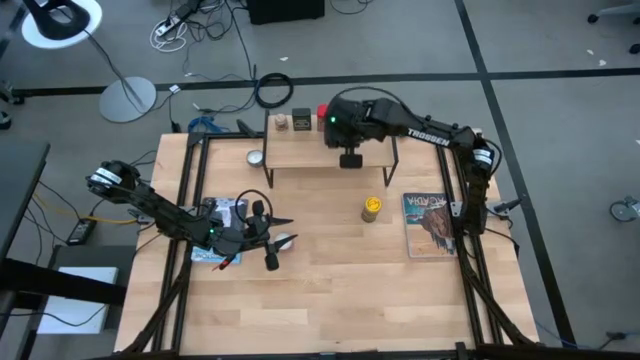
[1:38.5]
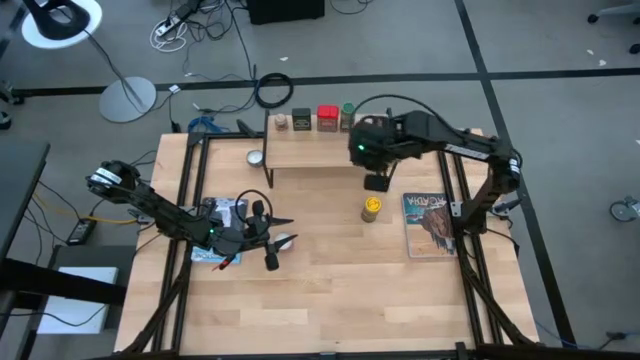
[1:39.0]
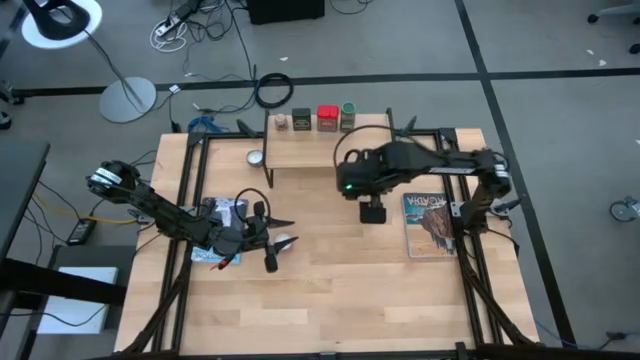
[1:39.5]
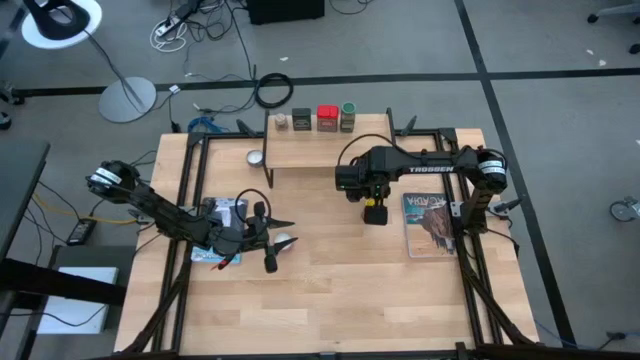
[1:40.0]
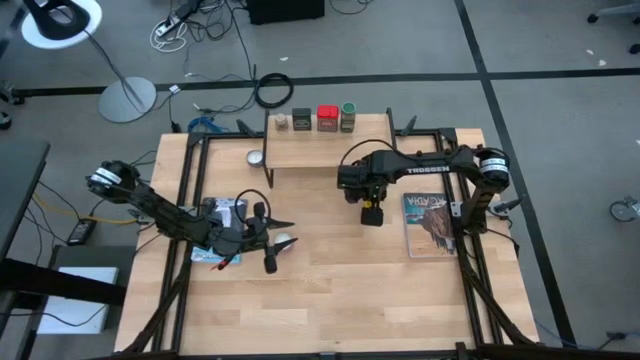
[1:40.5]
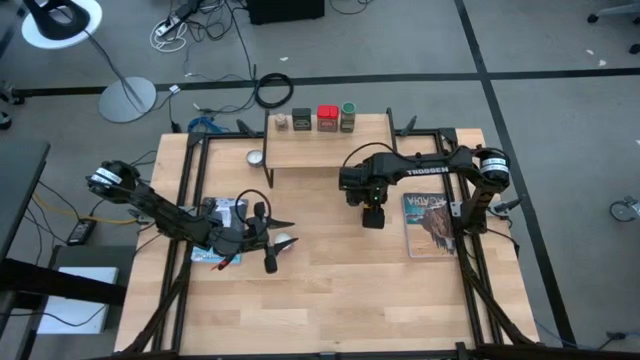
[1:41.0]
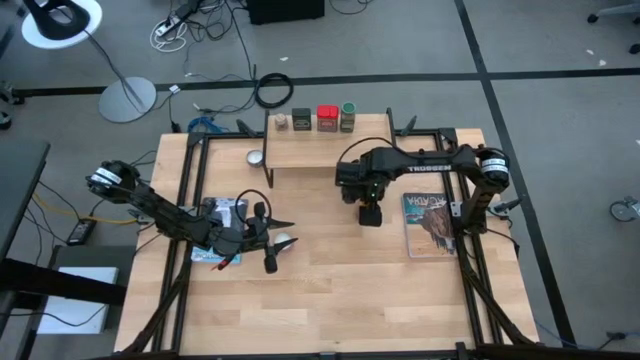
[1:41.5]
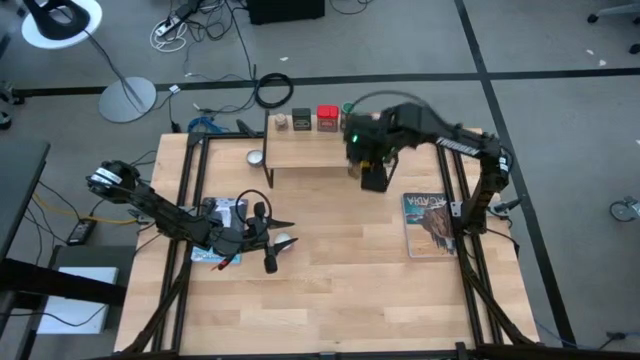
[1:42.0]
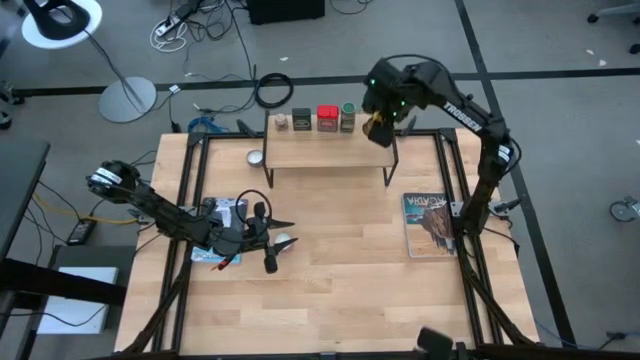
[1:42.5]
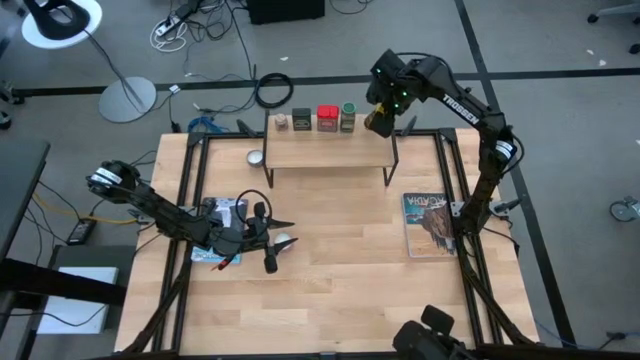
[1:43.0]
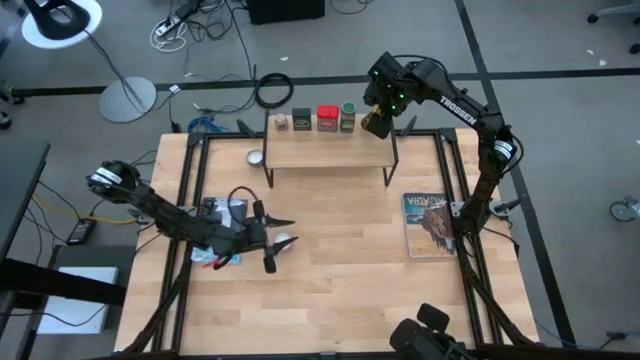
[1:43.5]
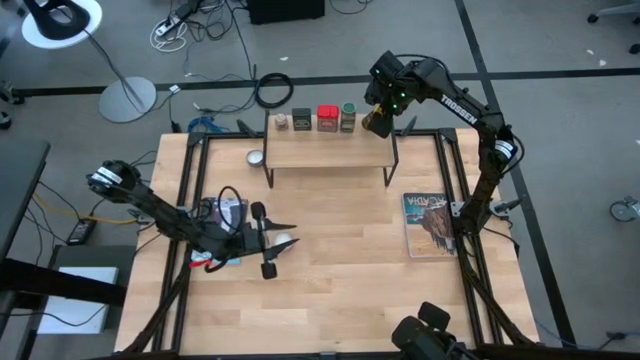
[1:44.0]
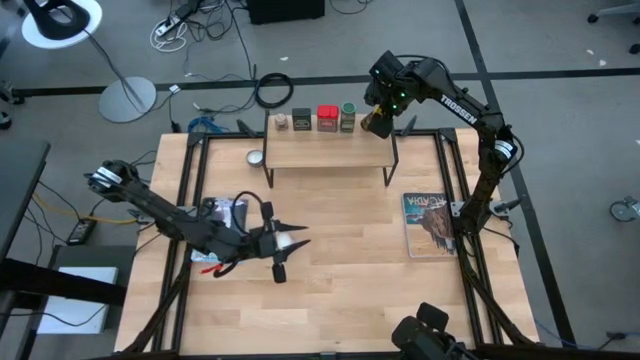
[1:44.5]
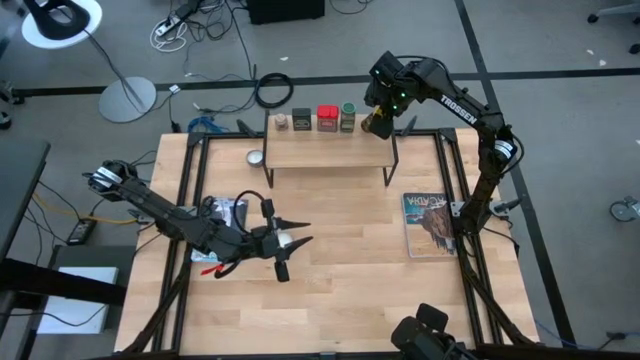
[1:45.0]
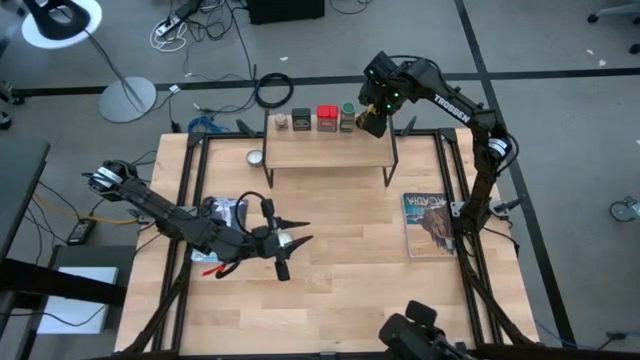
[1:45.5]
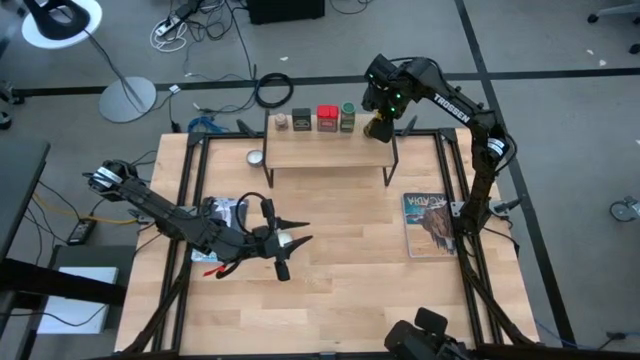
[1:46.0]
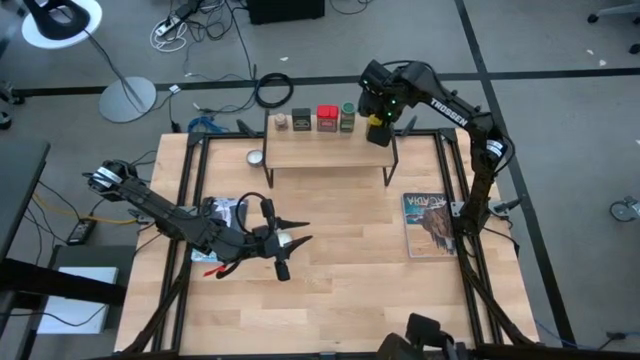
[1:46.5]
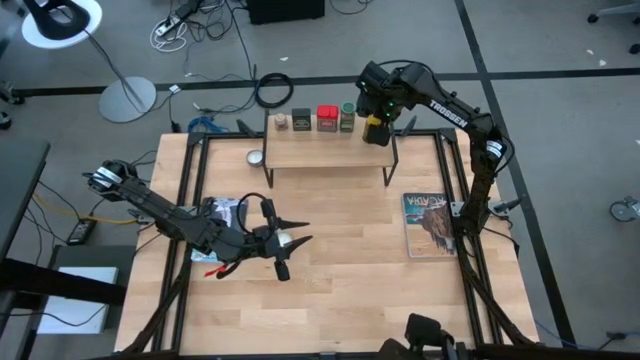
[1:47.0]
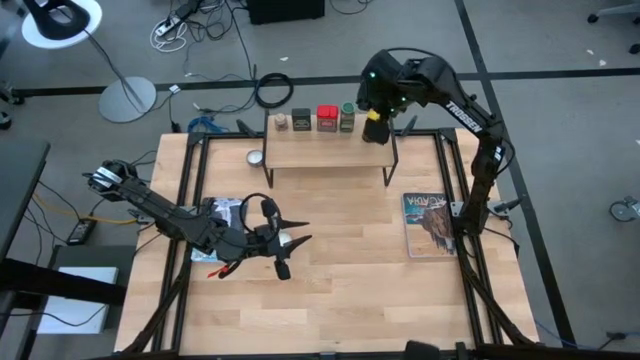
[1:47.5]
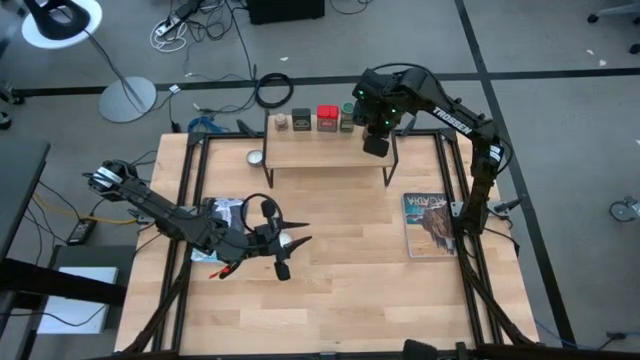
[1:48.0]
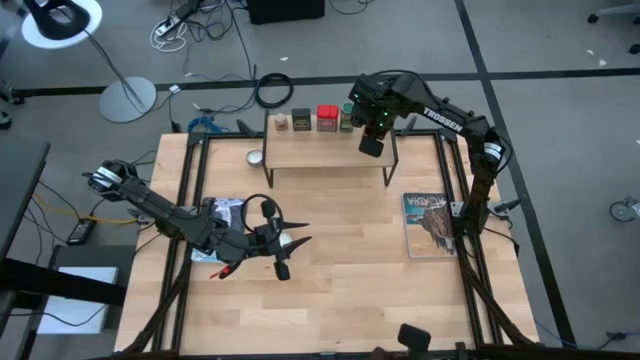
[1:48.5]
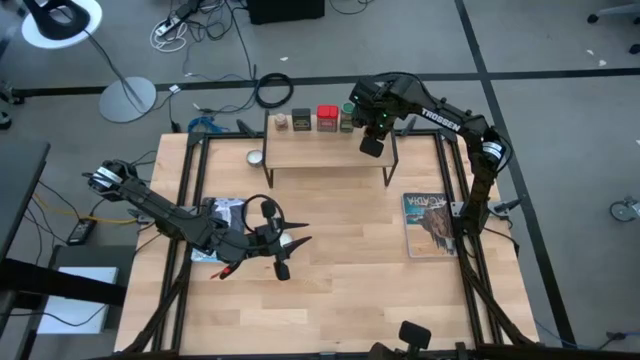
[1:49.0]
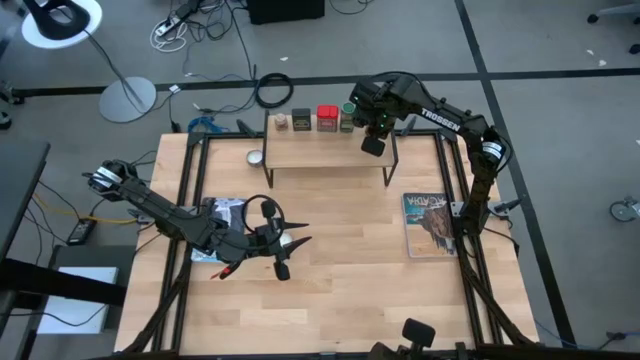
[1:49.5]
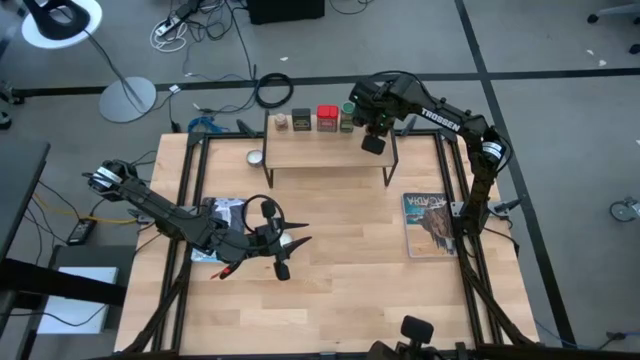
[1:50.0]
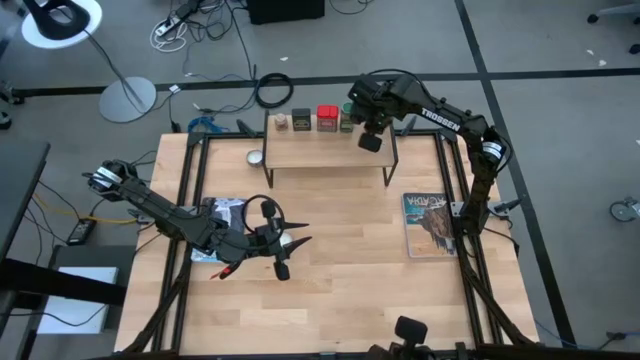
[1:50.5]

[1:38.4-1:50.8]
Task: Shelf spices
Put the yellow seasoning bottle on the shelf

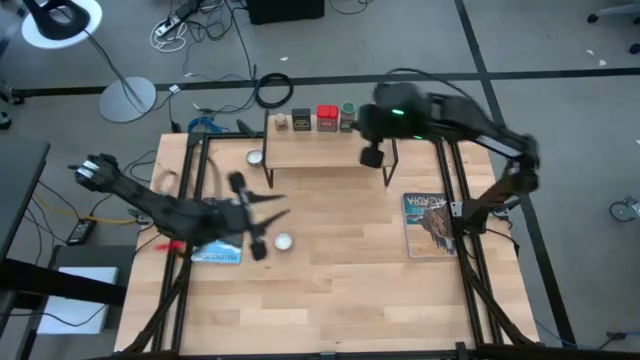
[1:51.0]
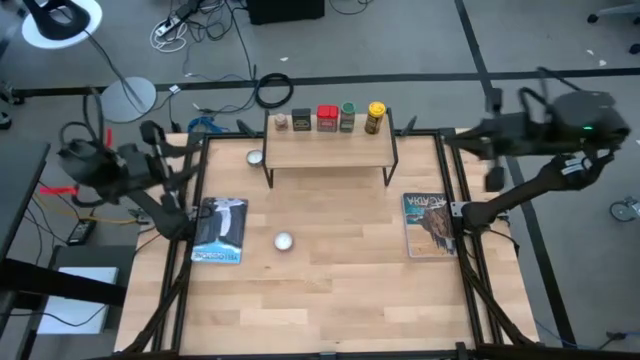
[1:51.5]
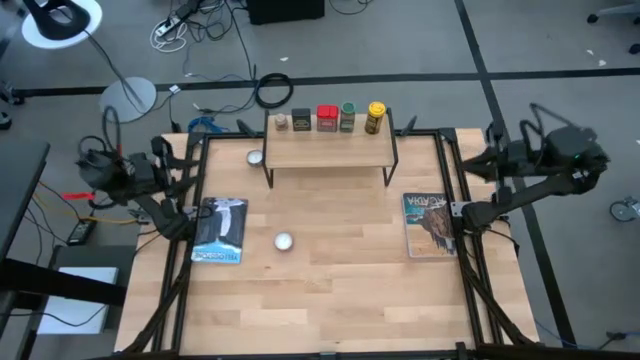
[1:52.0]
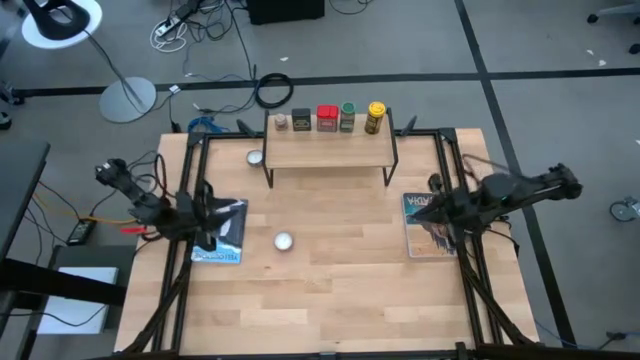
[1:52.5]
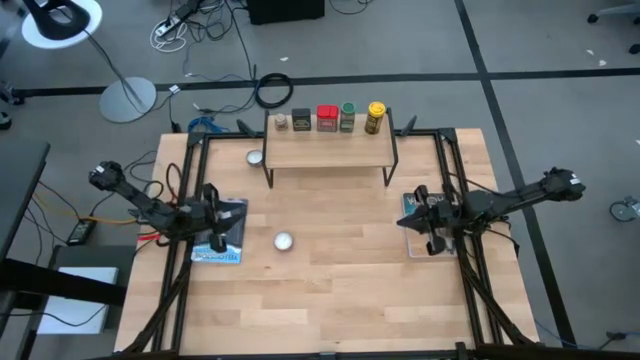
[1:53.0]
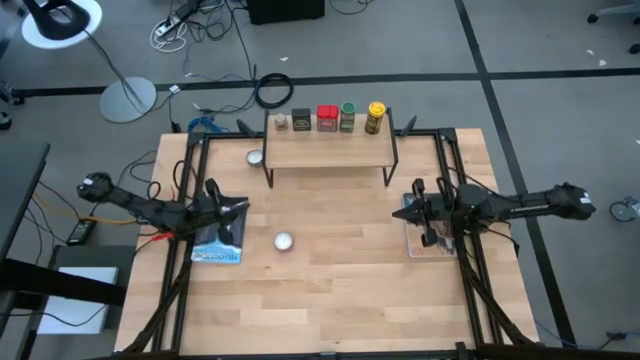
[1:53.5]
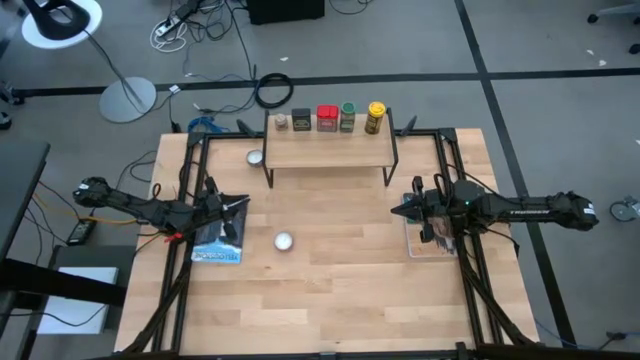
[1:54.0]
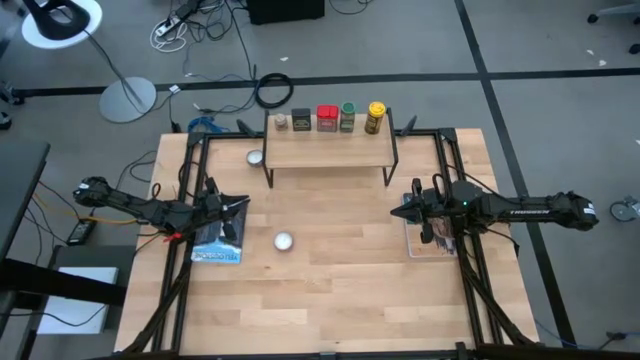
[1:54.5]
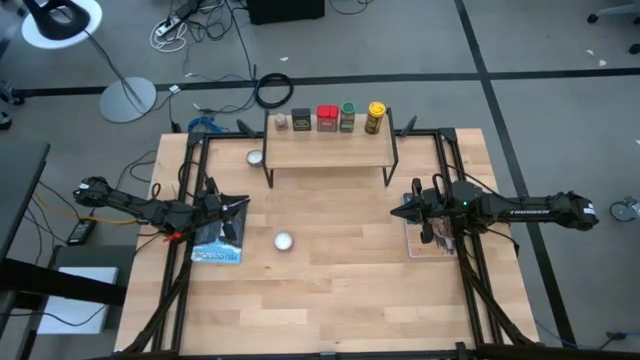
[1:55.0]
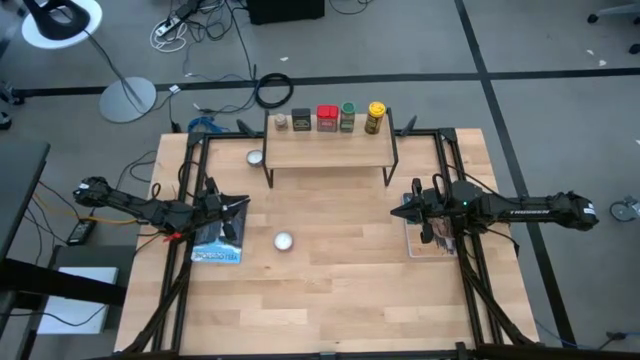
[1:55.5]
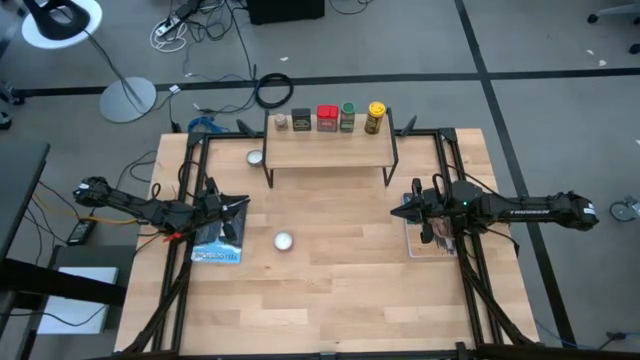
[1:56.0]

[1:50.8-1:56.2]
Return to Home Position

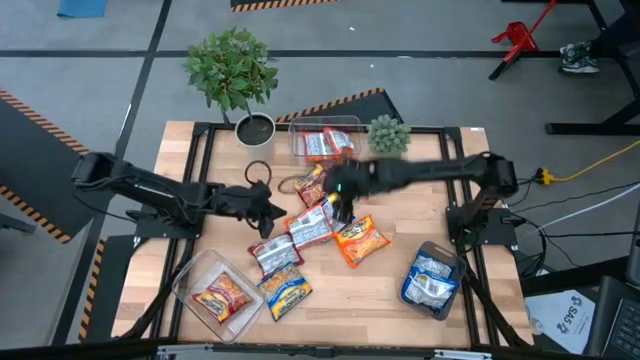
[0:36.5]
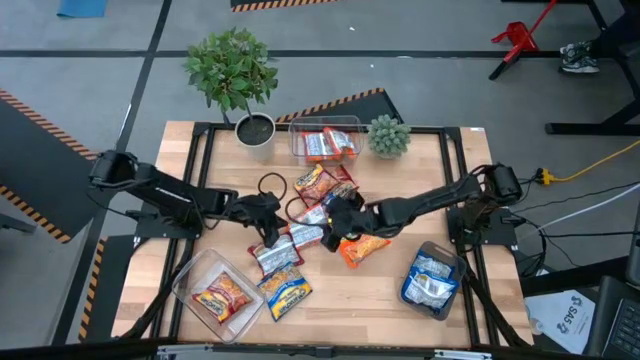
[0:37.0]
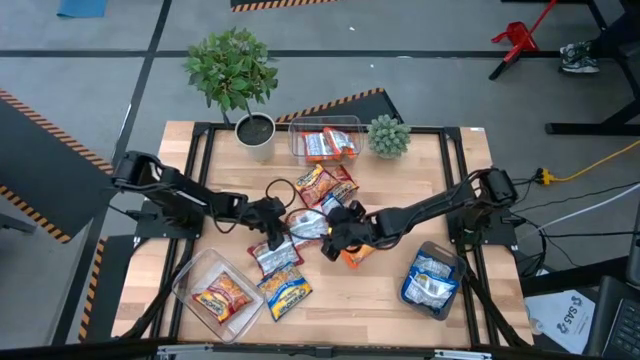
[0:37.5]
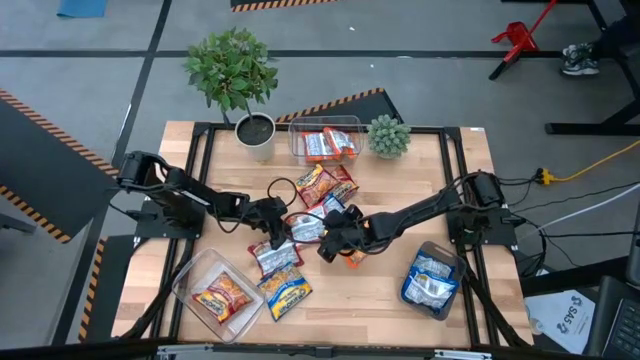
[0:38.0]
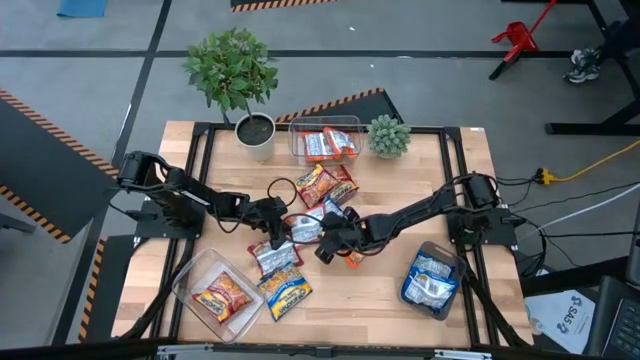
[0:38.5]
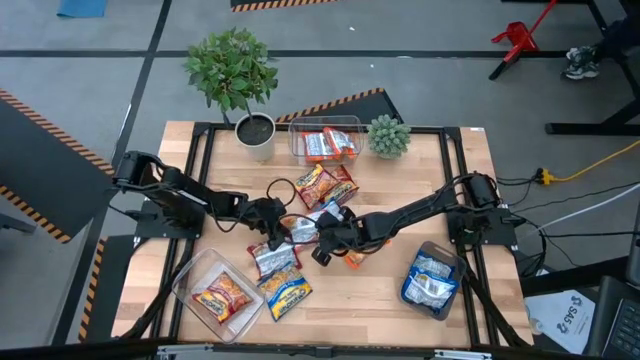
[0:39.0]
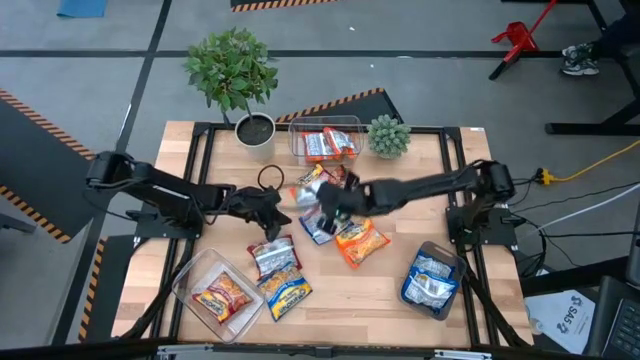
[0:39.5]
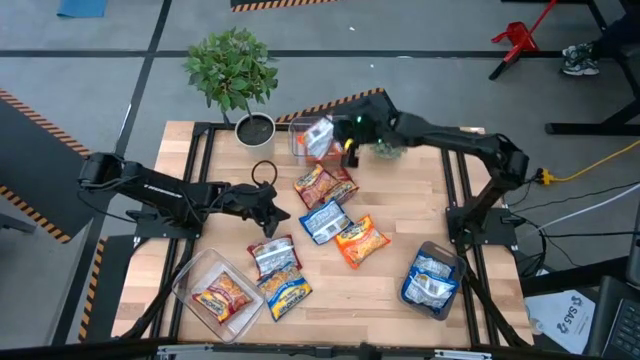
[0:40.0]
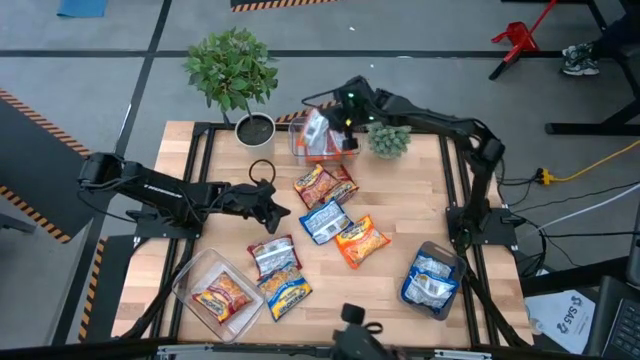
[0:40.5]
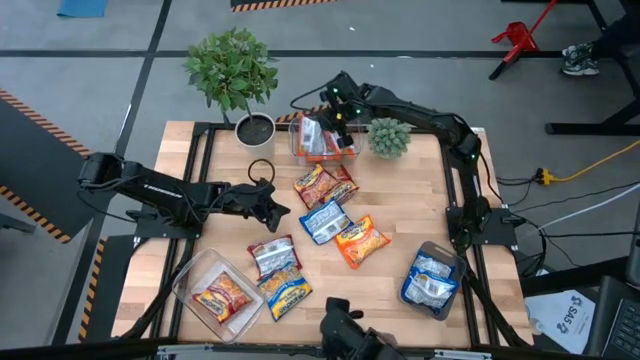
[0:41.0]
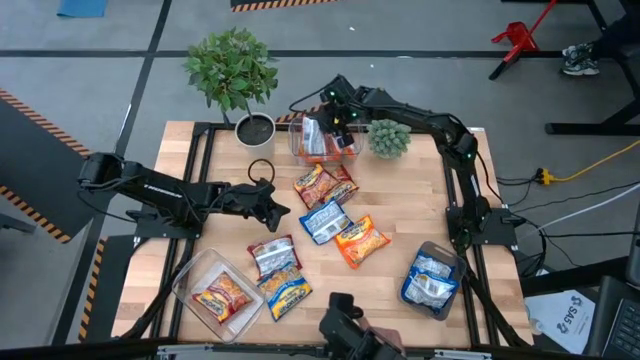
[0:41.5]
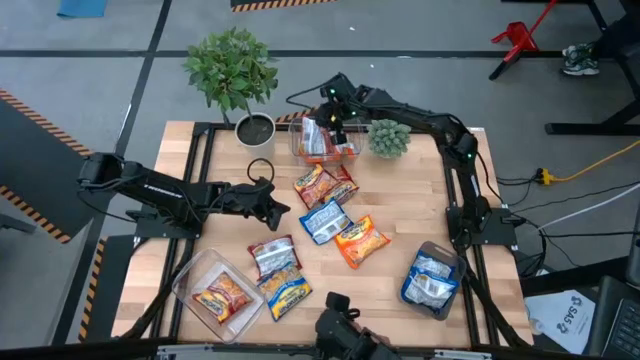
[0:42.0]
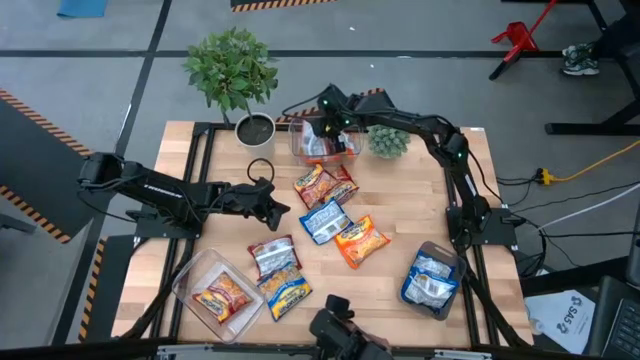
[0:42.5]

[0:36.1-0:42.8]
Task: Sort Maruchan noodles
Put the orange noodle pack into the top transparent bin
